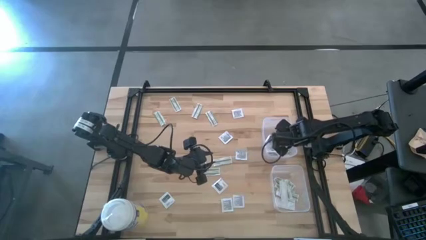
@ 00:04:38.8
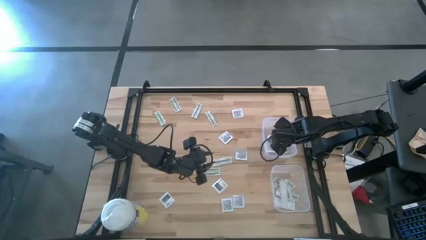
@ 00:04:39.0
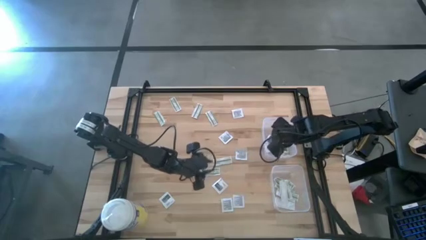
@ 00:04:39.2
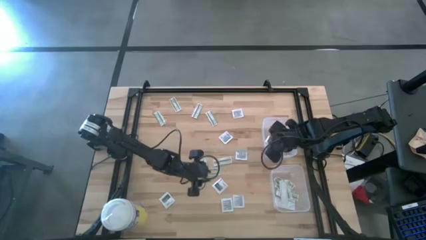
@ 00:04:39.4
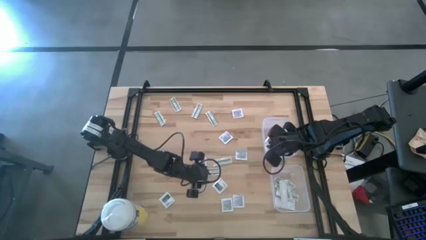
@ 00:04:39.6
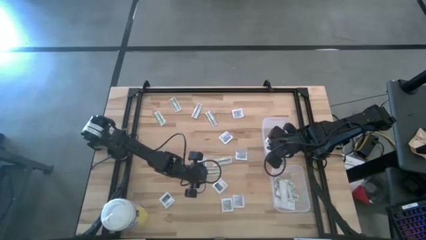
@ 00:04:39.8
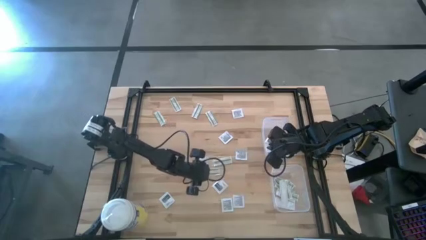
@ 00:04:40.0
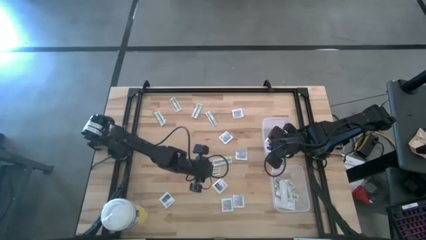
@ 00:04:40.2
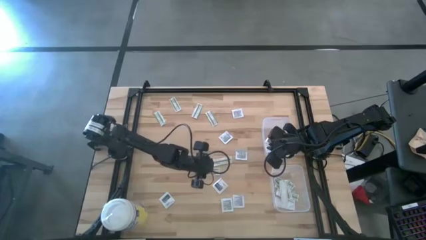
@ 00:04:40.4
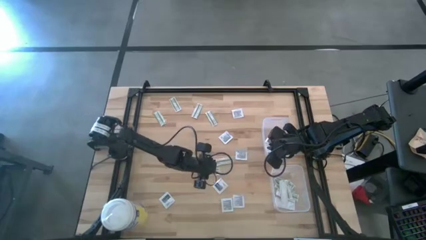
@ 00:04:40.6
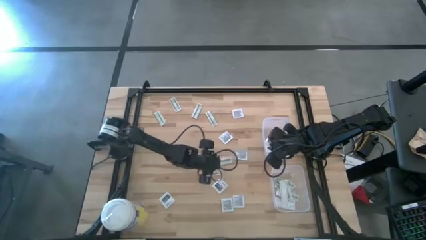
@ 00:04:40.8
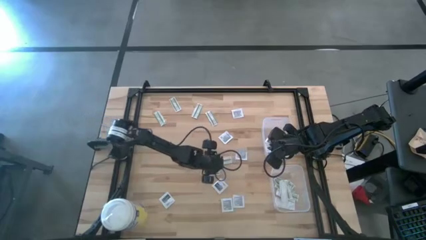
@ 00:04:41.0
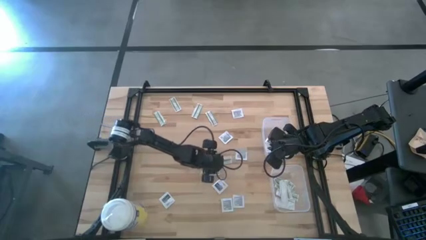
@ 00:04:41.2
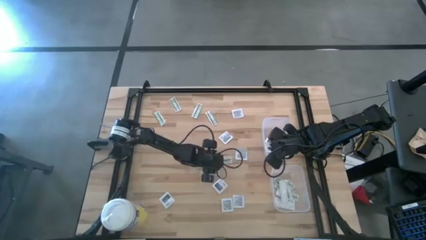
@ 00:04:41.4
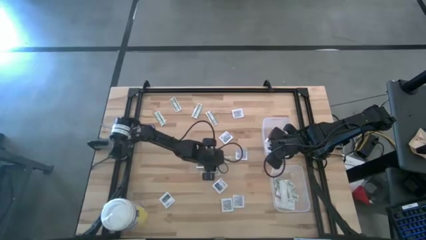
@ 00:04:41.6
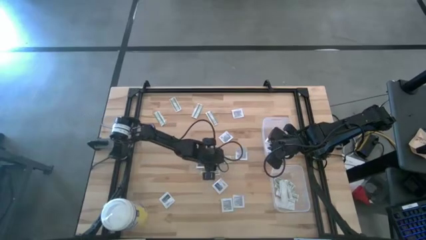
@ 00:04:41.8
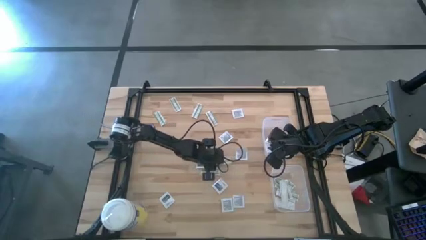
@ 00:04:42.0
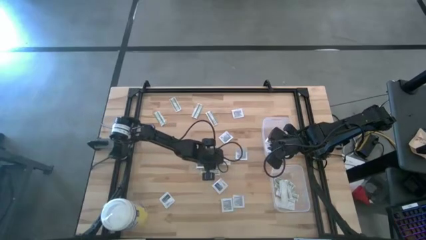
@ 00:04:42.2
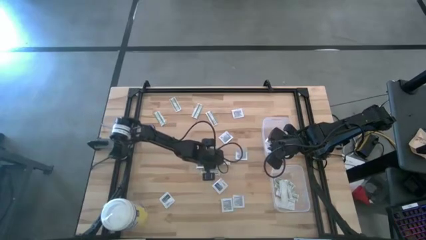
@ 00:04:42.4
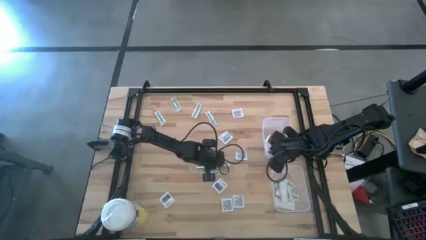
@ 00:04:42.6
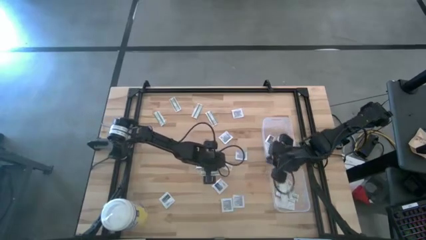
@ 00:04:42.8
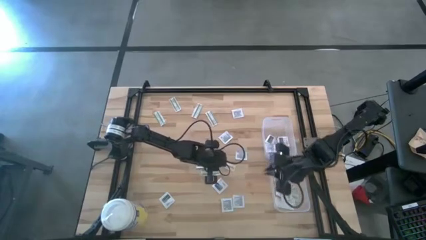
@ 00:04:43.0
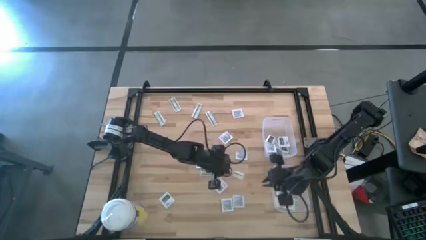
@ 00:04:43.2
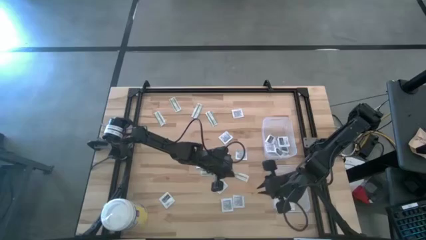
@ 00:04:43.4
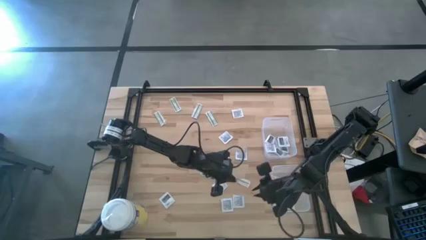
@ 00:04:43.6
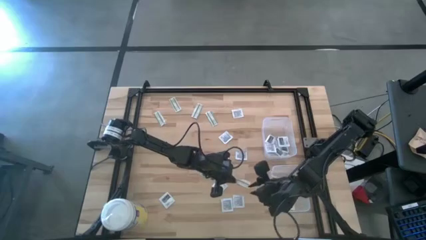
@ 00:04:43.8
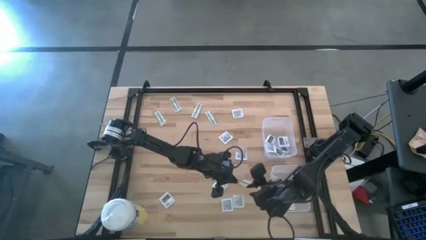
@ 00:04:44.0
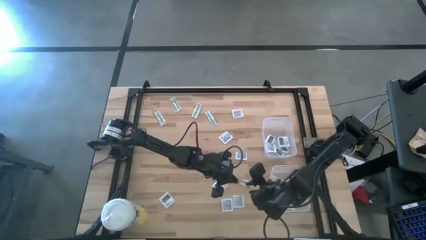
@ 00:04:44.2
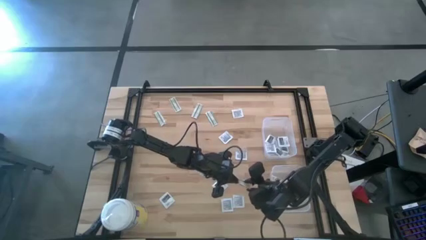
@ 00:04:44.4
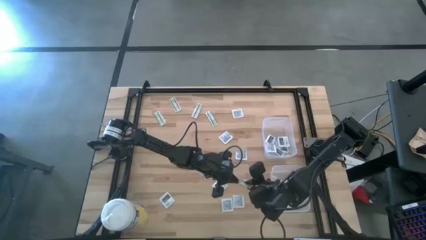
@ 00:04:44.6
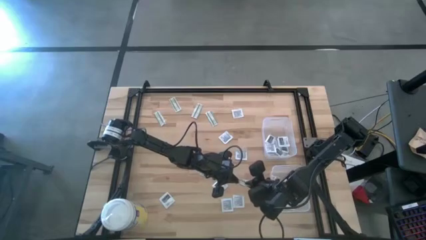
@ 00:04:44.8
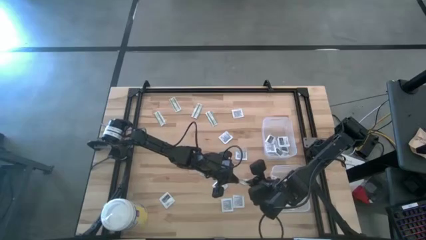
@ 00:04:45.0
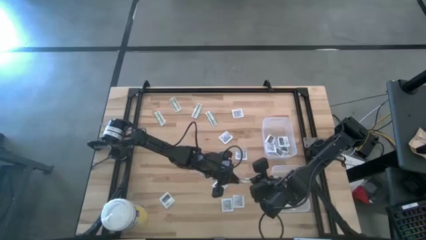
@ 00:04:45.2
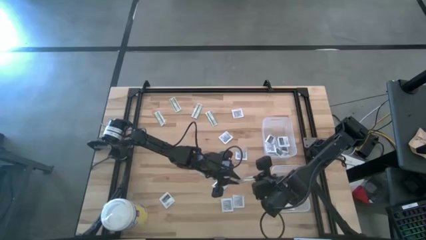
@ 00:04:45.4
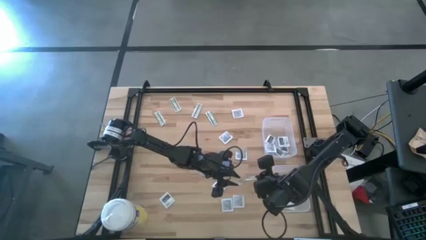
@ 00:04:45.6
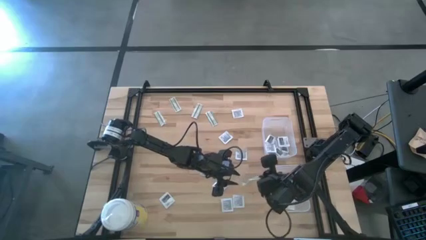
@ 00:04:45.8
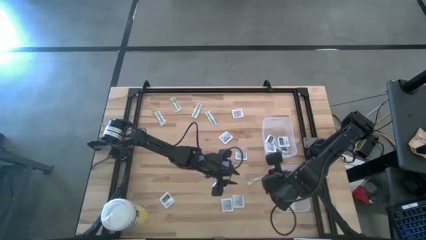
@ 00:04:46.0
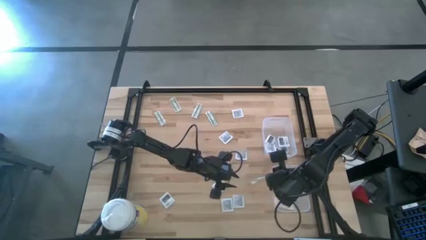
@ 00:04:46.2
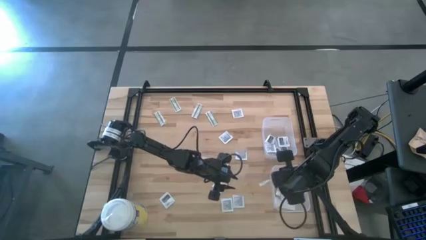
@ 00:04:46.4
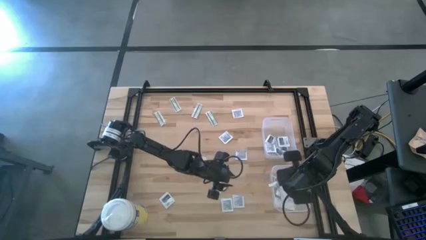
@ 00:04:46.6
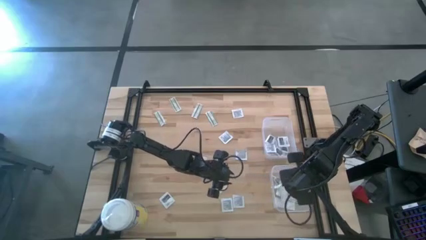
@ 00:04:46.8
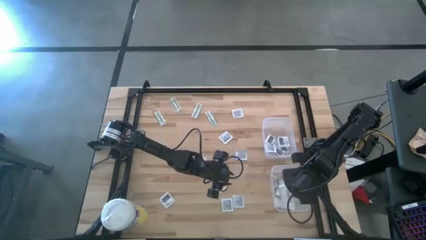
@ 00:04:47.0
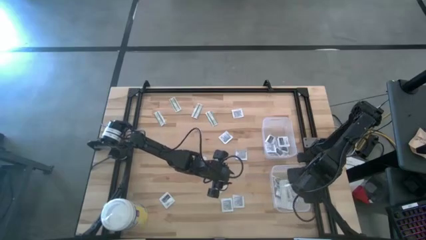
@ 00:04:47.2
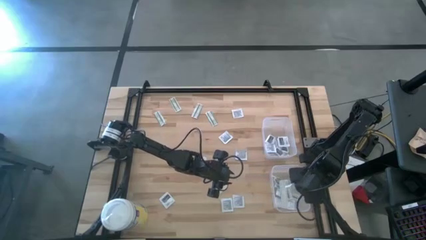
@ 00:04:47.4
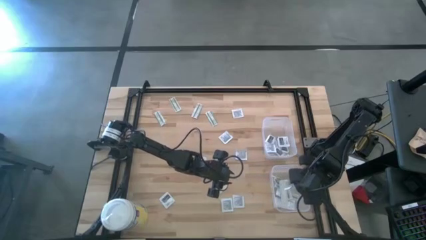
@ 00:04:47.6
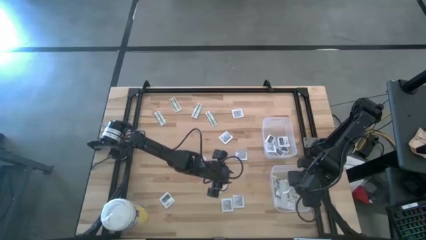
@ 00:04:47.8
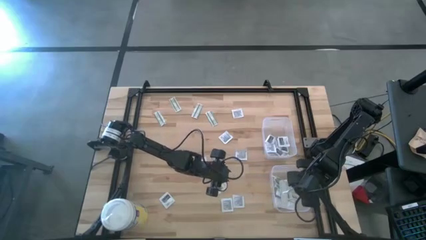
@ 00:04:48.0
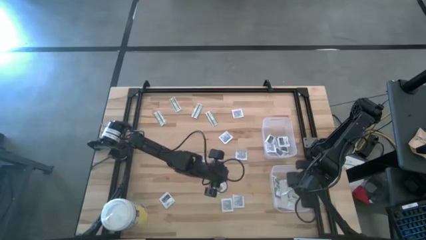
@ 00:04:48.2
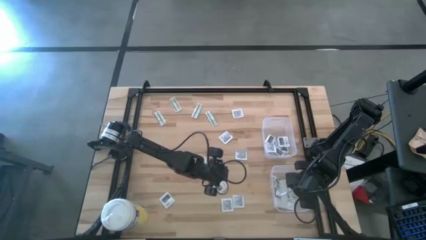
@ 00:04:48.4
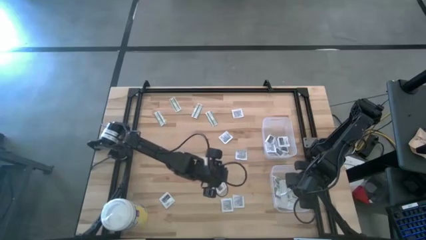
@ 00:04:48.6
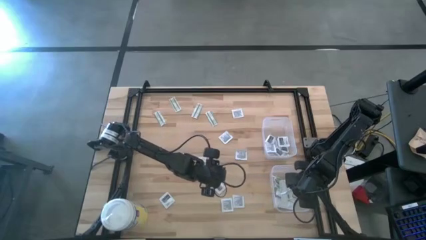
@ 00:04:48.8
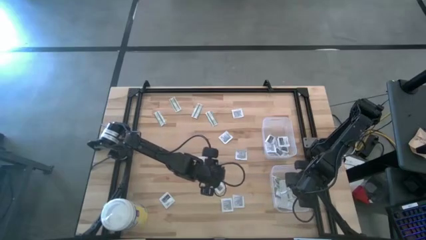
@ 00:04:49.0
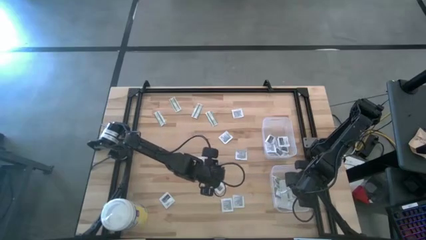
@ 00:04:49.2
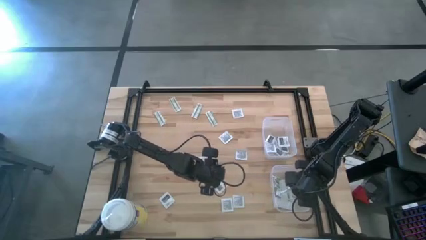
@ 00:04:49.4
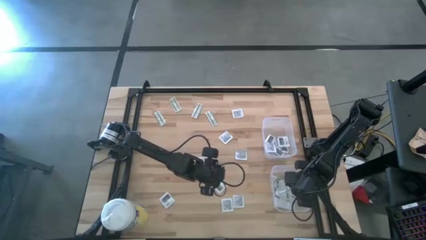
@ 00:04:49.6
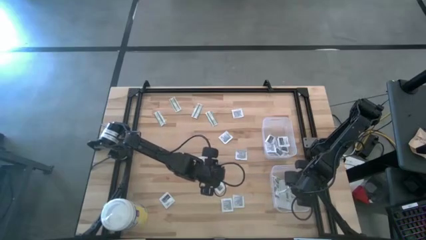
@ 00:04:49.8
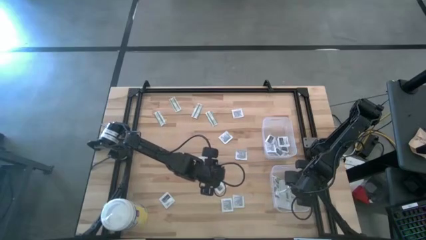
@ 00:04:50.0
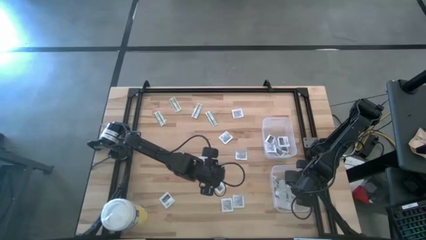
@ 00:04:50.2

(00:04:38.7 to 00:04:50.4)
Task: Pick & Place First Aid Supplies
Put the bandage pack into the bottom bin

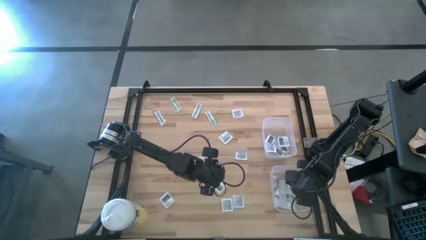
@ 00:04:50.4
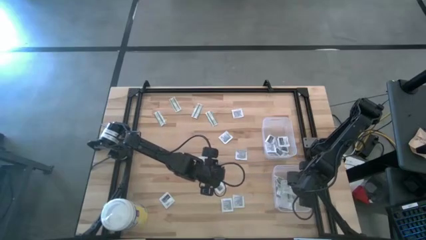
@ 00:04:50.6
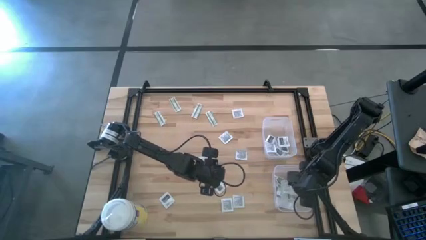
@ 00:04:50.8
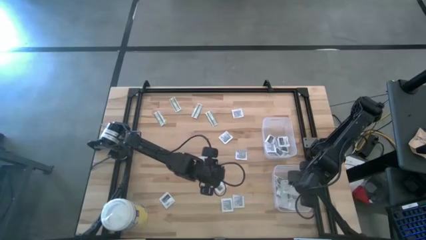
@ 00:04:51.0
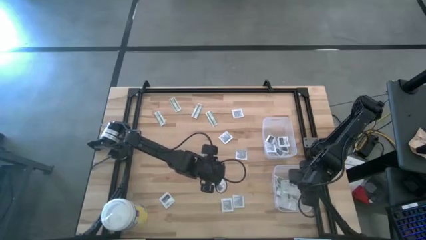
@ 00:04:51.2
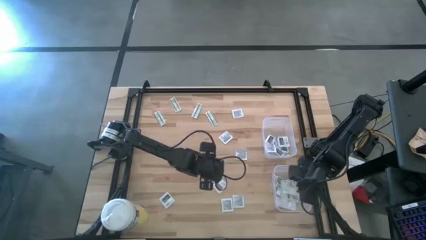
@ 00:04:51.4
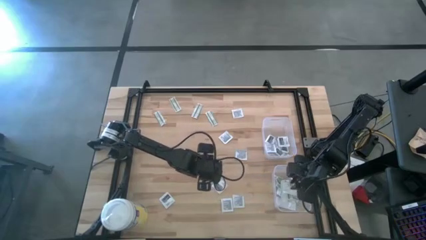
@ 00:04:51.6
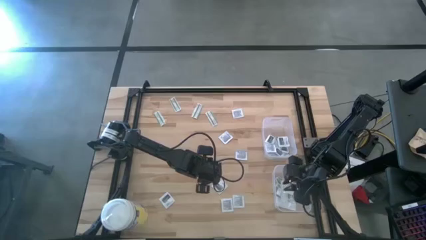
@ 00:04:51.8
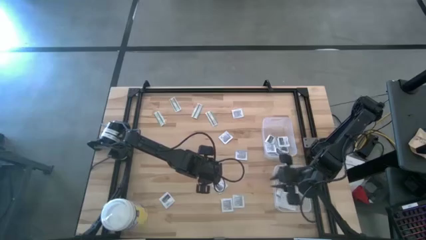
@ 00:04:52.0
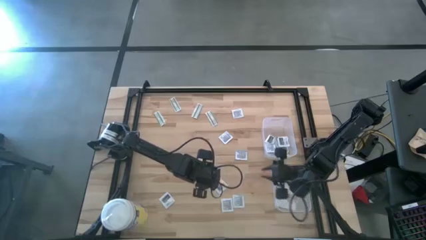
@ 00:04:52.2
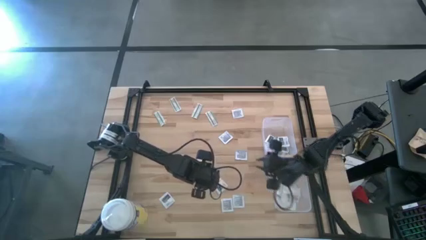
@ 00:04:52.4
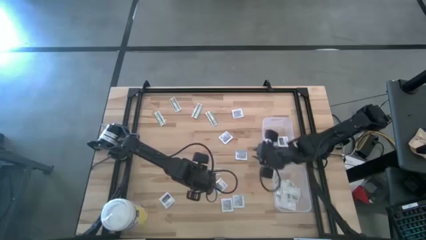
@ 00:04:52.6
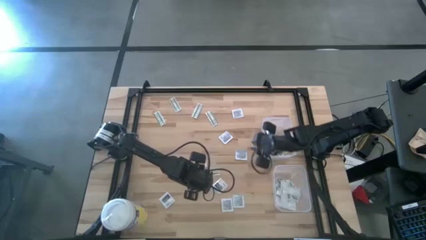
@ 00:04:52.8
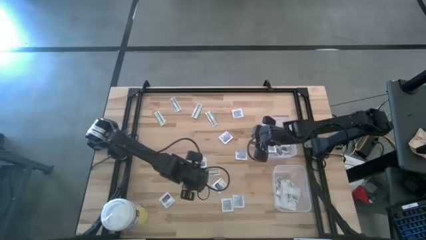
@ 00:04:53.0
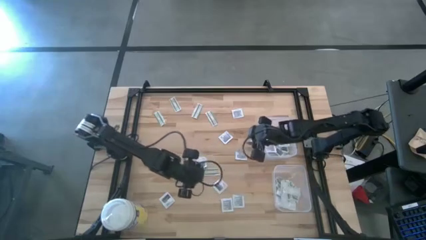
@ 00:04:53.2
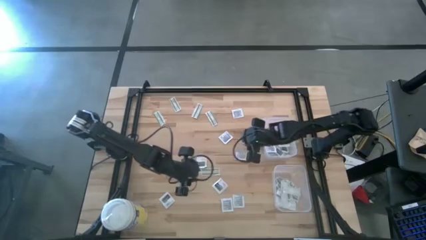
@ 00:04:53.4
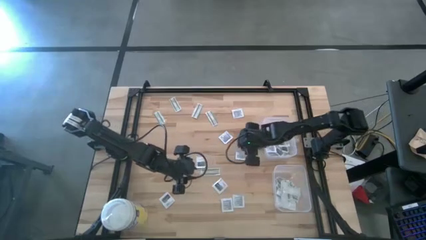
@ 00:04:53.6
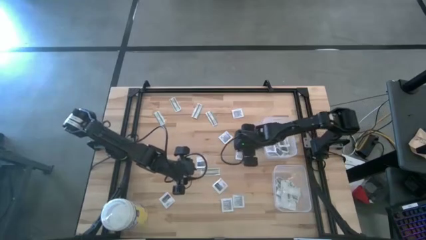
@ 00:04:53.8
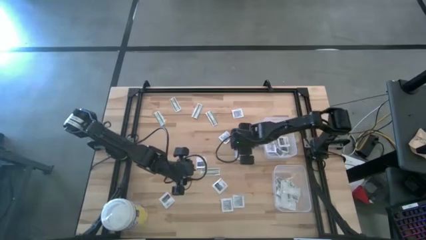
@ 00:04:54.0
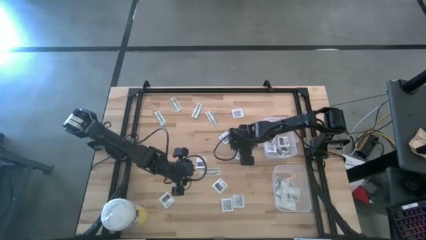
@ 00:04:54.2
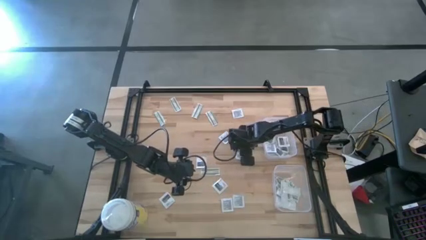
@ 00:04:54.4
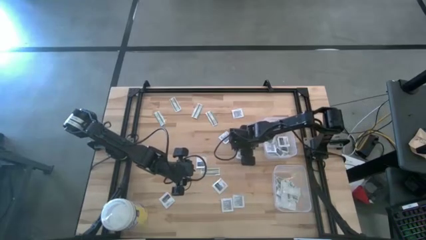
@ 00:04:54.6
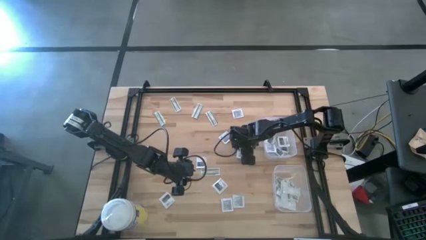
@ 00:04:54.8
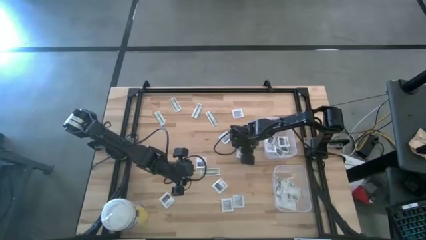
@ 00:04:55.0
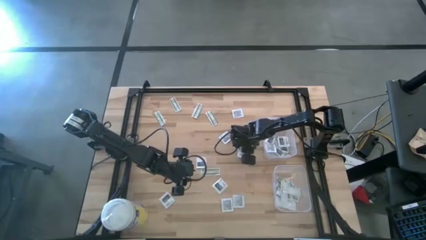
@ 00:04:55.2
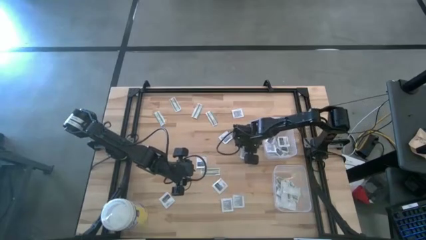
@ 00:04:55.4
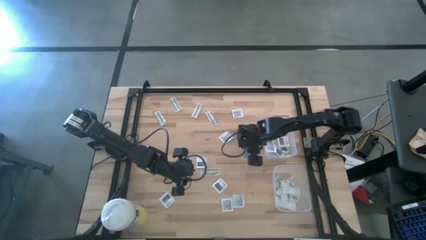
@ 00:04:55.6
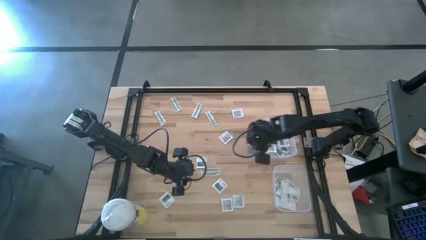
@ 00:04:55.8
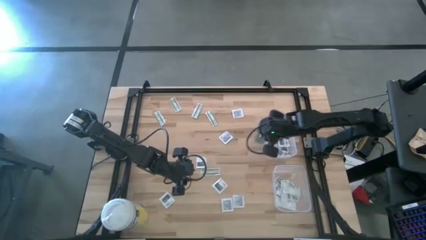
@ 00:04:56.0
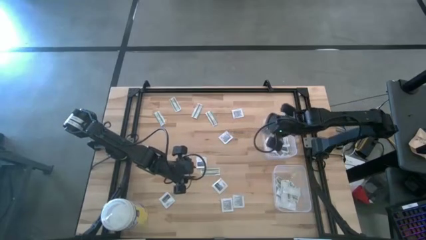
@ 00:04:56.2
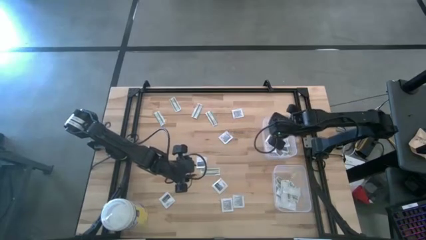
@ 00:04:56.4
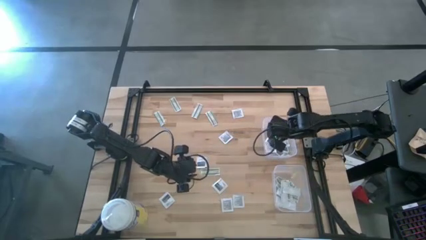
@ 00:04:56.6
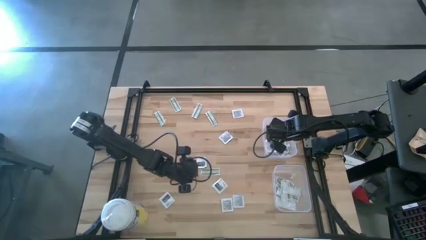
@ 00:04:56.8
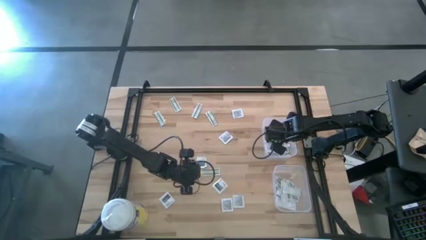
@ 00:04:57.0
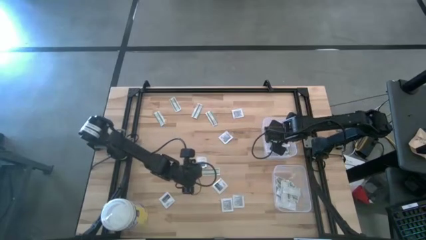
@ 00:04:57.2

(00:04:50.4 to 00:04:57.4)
Put the towelette pack into the top bin
